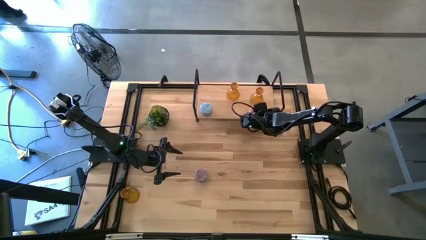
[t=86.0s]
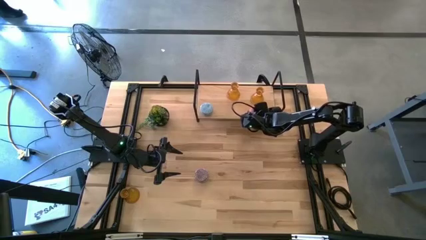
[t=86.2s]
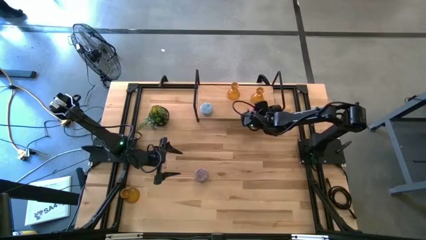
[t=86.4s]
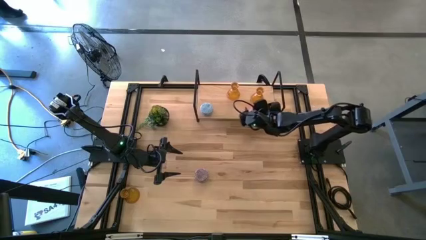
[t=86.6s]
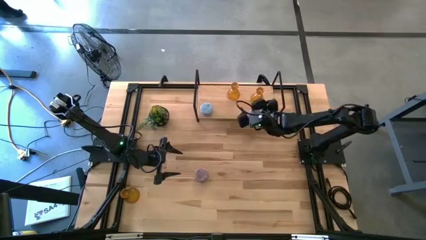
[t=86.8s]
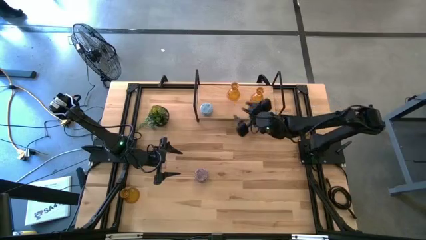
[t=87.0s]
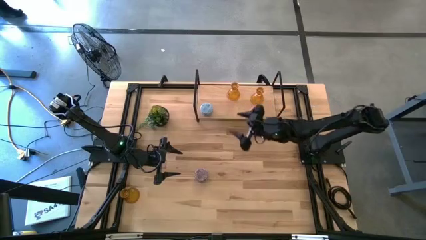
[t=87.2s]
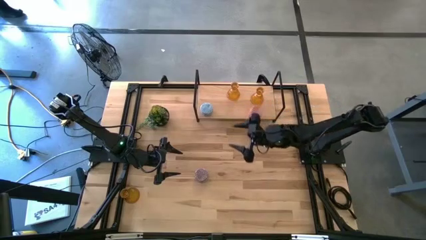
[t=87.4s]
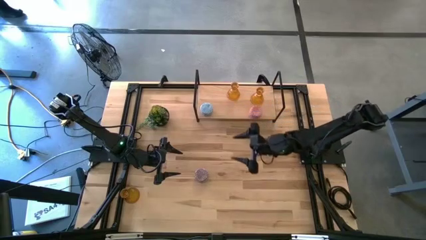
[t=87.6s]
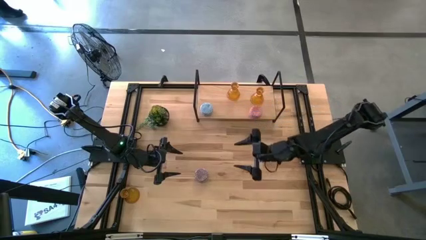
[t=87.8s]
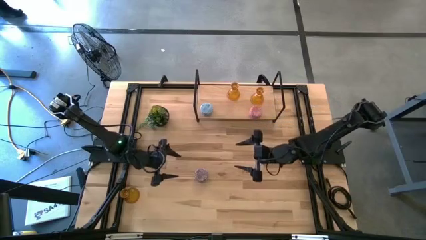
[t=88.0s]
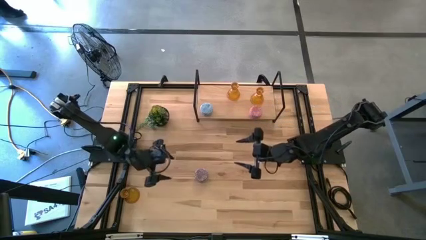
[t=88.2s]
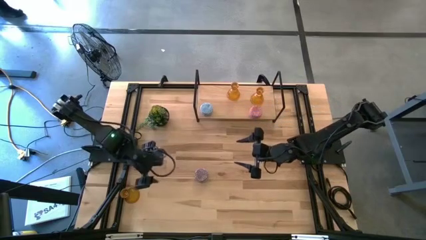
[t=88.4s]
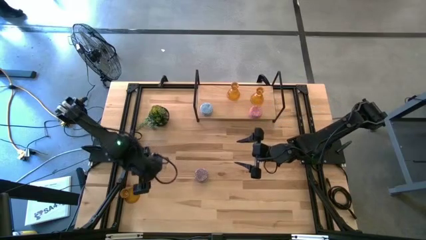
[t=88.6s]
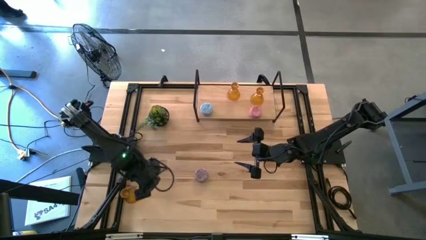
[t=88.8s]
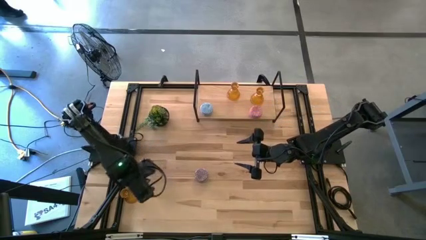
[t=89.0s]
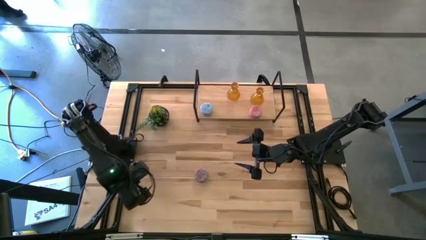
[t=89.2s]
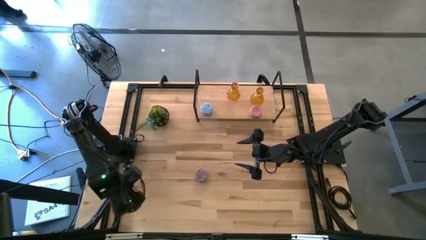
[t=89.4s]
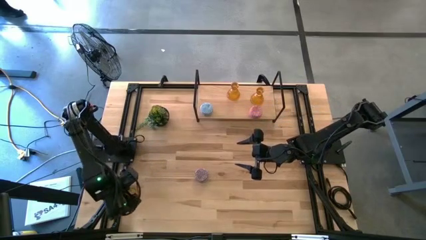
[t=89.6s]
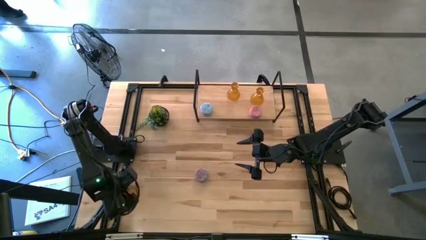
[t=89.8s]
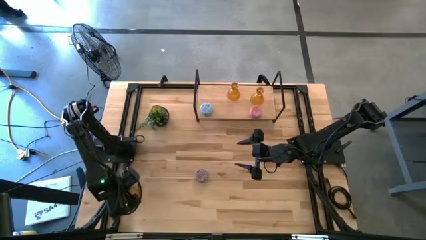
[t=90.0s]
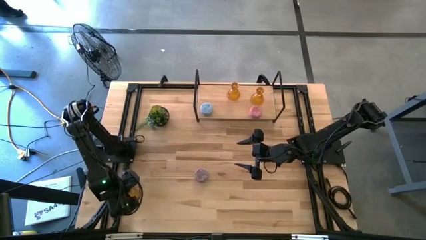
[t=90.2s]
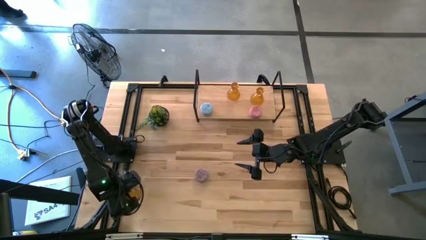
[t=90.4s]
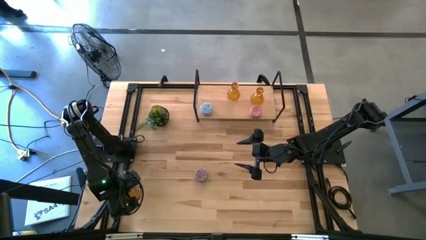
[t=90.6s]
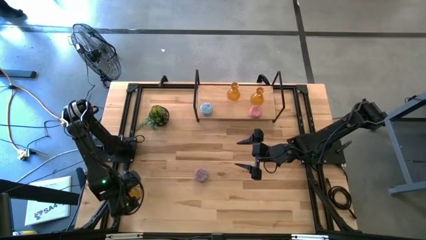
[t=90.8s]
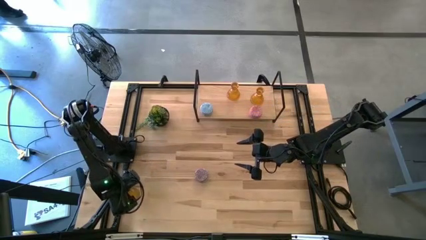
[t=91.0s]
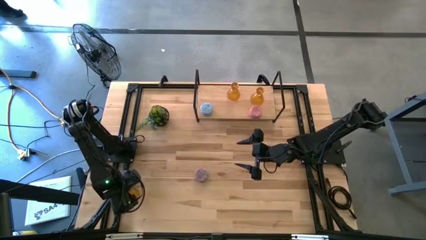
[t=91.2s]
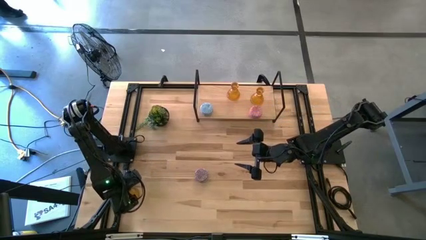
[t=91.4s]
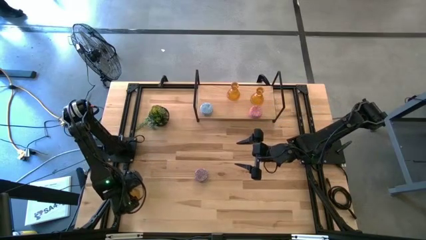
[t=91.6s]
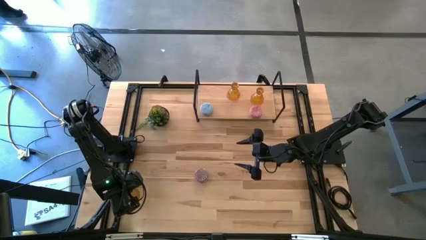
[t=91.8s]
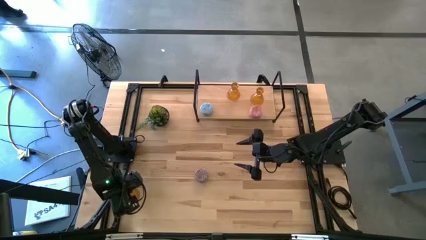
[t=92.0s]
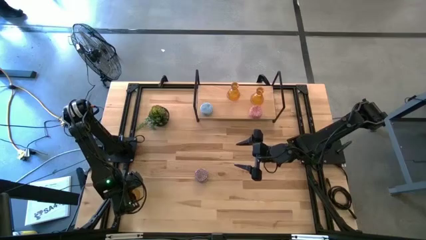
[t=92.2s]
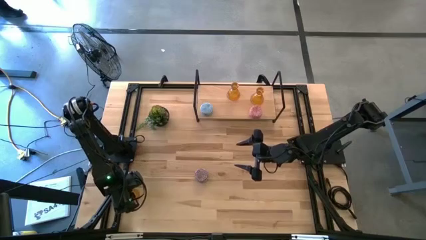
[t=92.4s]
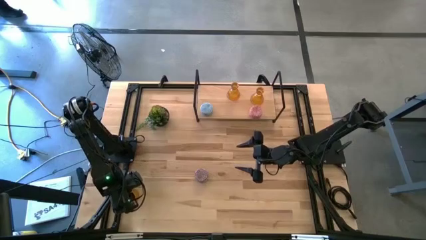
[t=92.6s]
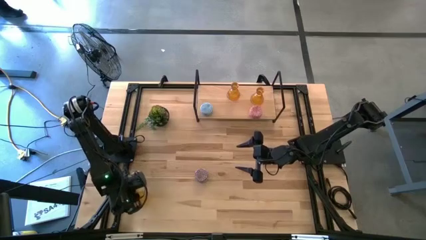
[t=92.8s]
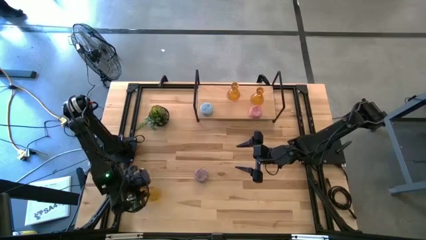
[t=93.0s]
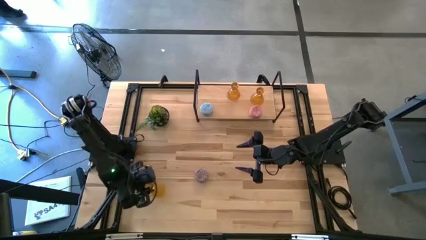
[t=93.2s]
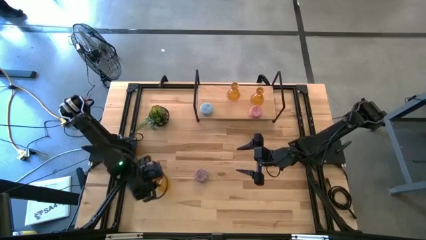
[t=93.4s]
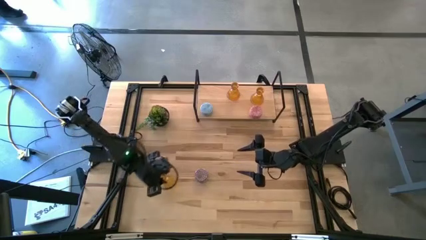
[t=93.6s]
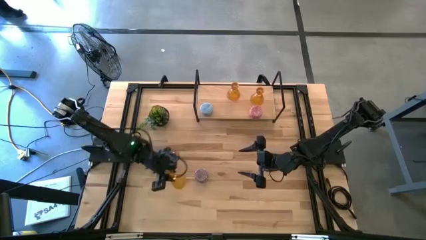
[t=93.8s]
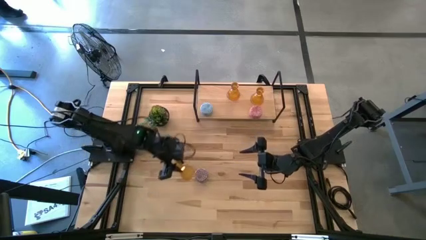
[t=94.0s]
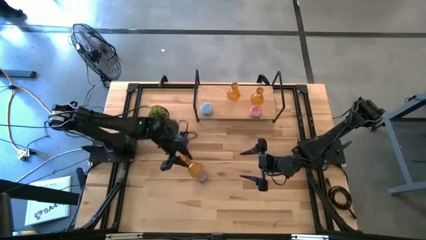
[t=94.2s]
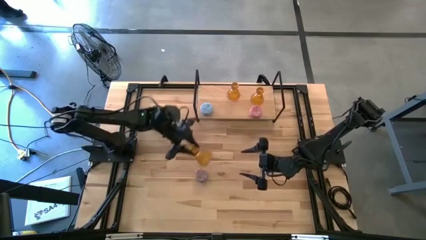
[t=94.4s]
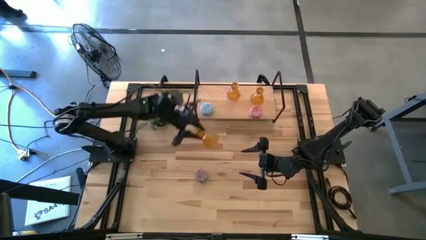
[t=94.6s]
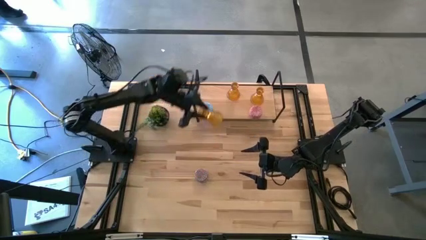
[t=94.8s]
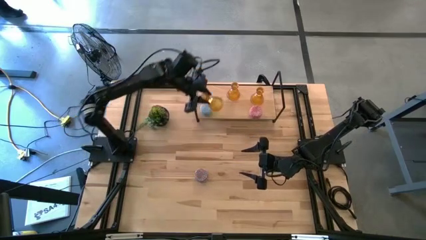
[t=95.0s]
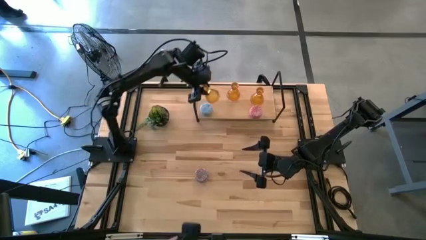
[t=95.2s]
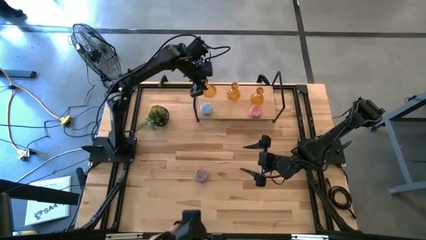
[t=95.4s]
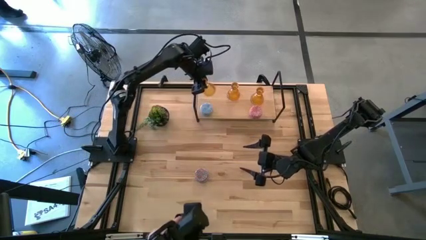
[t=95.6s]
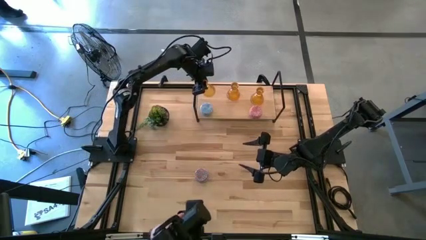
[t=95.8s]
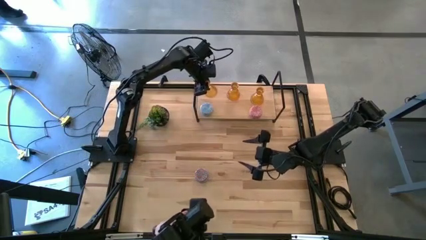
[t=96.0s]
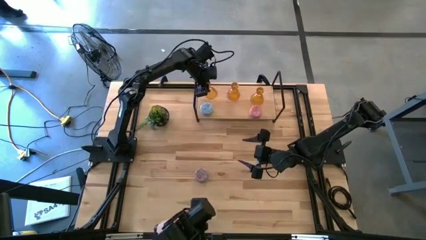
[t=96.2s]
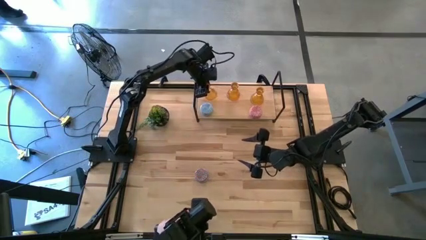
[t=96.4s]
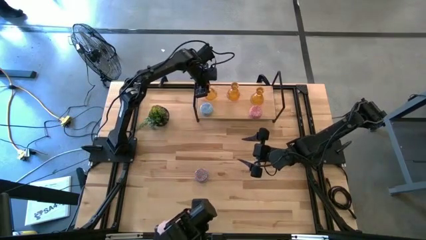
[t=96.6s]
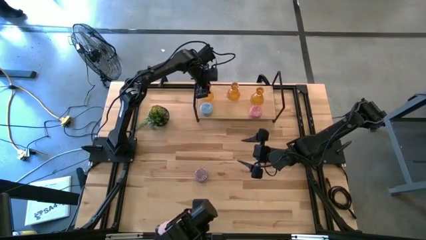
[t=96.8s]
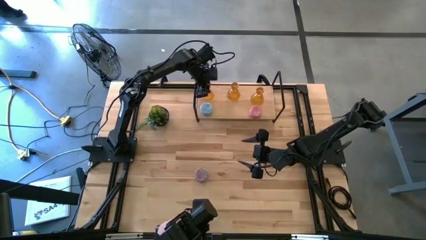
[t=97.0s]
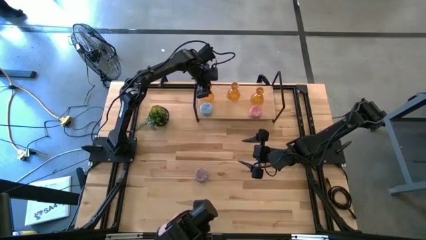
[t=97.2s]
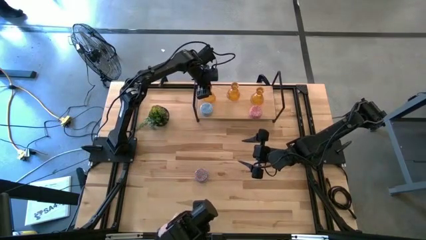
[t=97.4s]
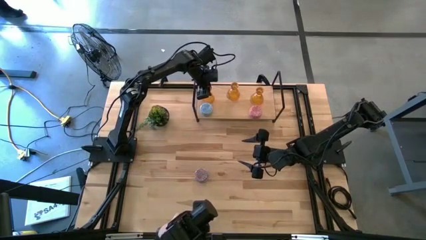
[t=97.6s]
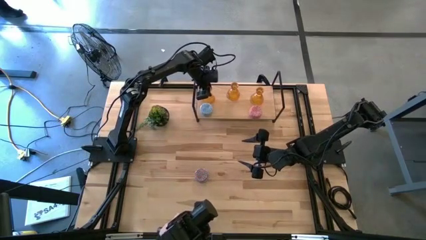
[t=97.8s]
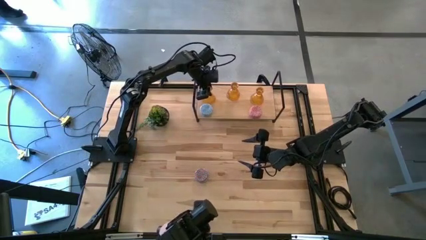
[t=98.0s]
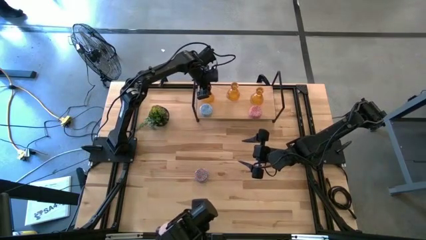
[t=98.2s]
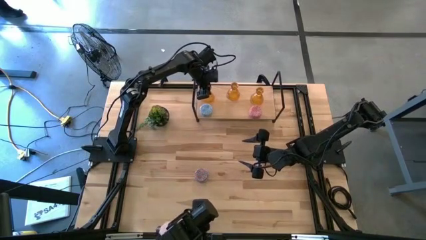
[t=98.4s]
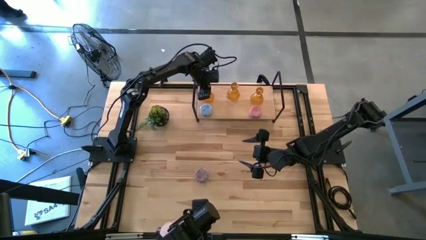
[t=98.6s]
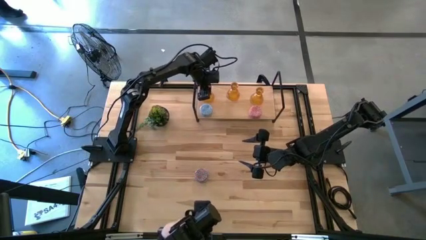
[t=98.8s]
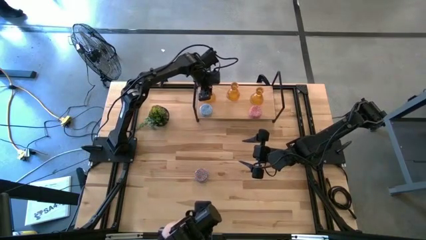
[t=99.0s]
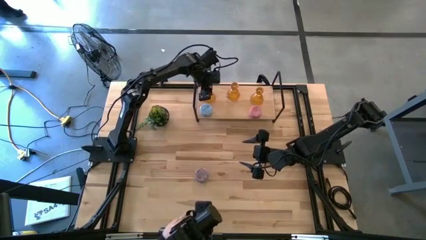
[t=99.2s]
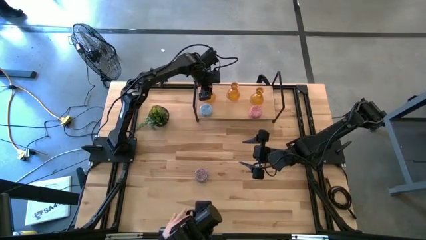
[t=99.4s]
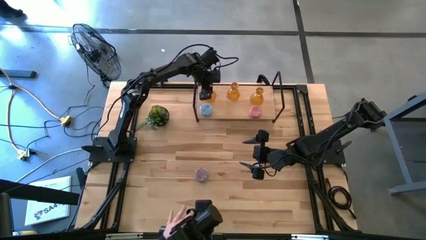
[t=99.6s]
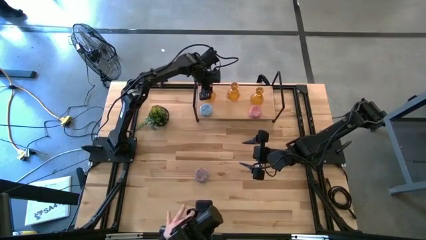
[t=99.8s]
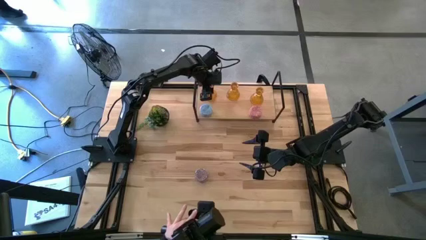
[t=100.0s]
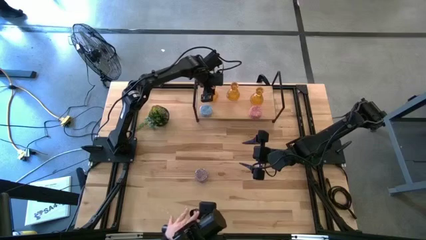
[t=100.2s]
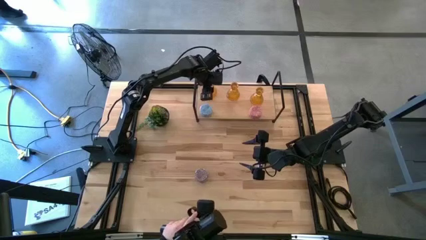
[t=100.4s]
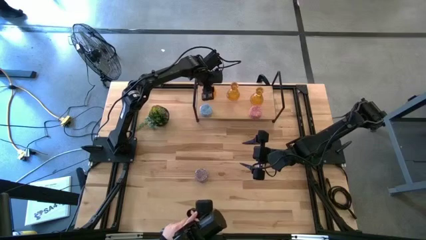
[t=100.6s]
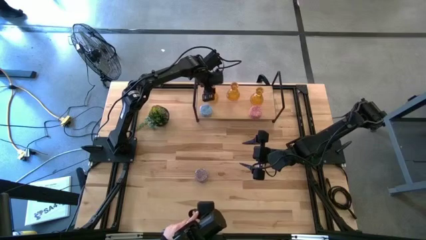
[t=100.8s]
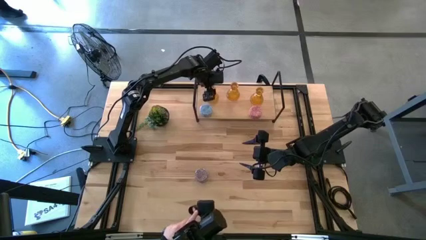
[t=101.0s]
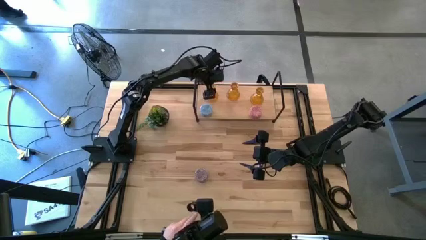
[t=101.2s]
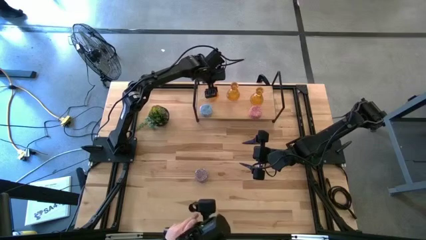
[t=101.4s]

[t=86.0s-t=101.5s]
Task: Pick & Place candle stick holders
Put the yellow candle holder on the shelf aligned with the other yellow candle holders

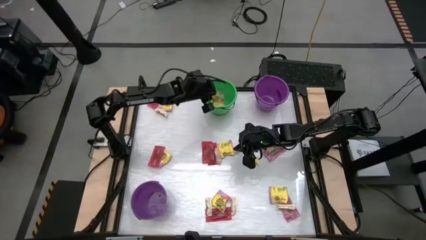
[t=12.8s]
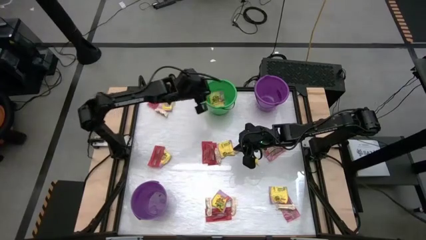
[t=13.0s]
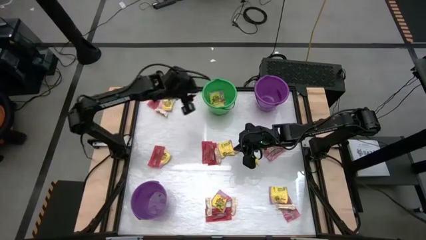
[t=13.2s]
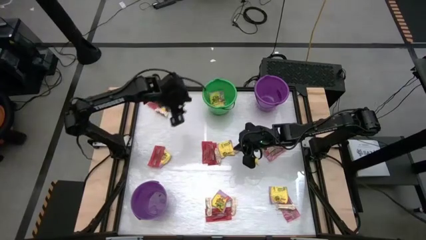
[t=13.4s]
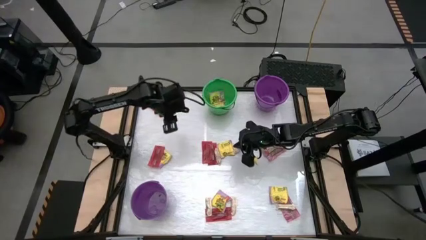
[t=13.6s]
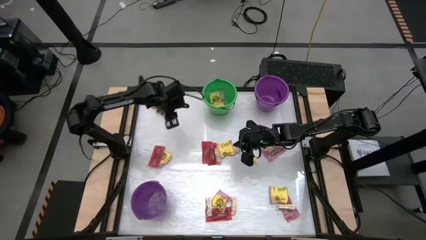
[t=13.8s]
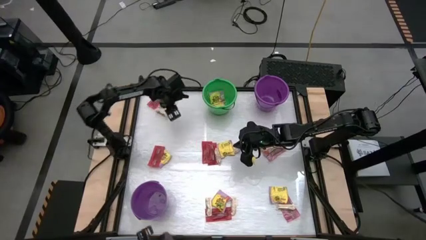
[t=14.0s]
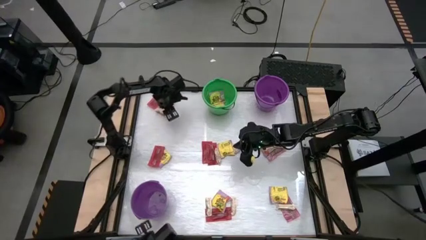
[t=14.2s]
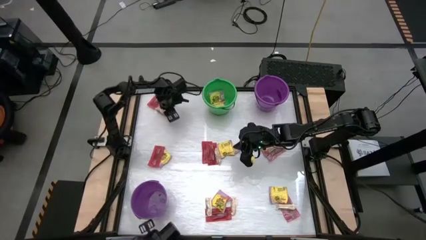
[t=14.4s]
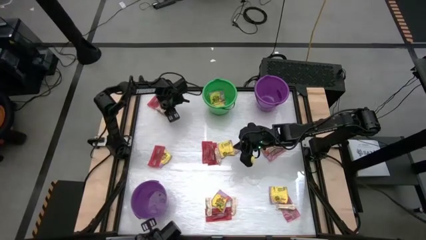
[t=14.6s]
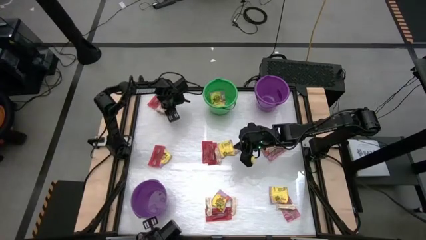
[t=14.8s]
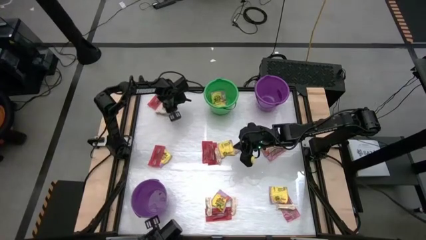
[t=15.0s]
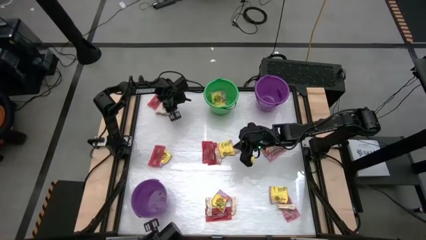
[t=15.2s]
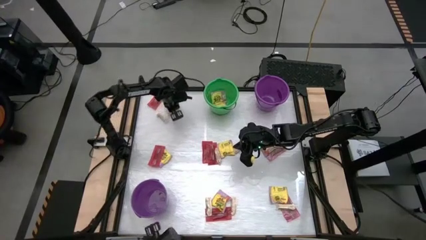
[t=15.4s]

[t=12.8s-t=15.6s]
Task: Sort candy by brand, put in halloween buckets
Put the yellow candy into the green bucket
